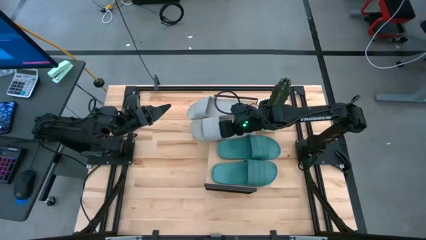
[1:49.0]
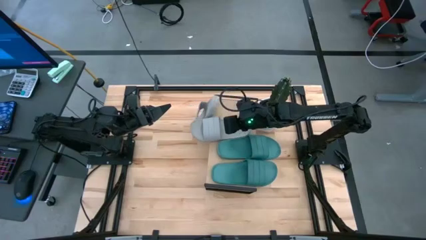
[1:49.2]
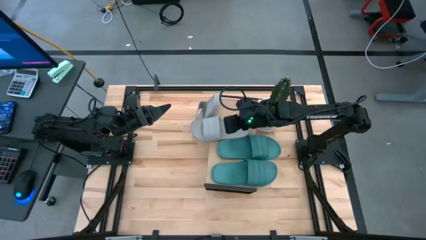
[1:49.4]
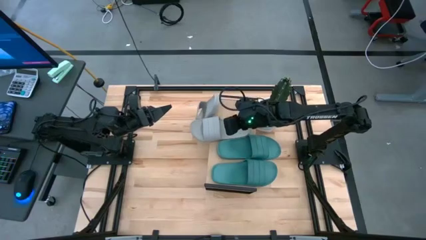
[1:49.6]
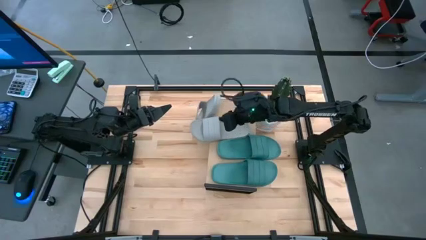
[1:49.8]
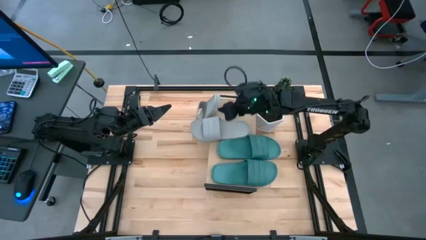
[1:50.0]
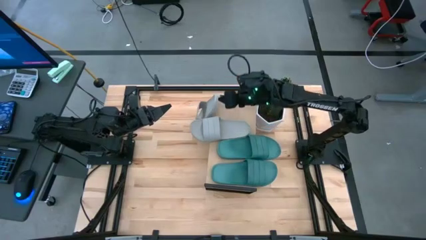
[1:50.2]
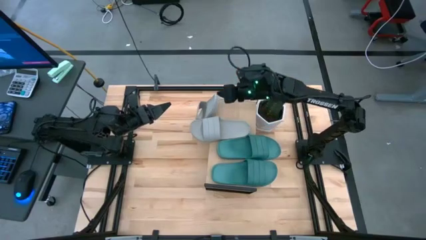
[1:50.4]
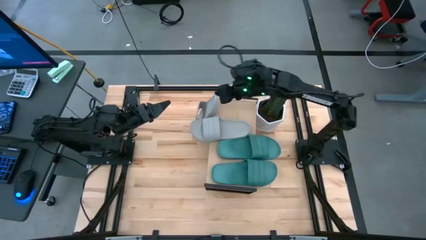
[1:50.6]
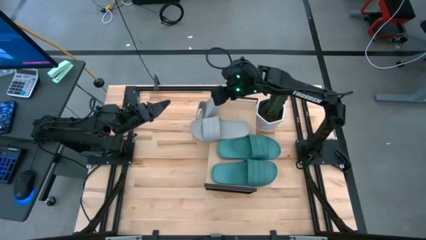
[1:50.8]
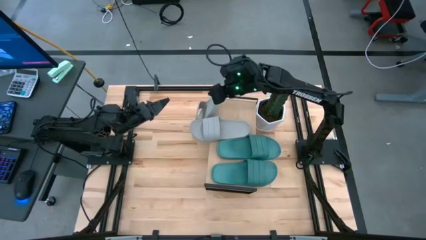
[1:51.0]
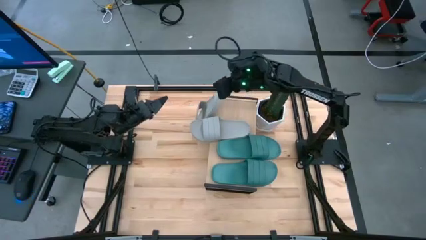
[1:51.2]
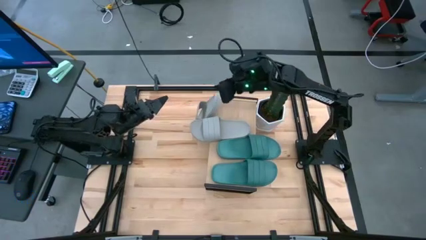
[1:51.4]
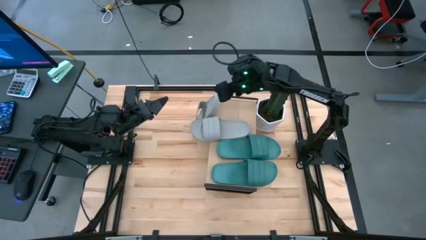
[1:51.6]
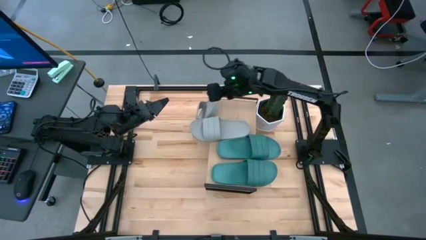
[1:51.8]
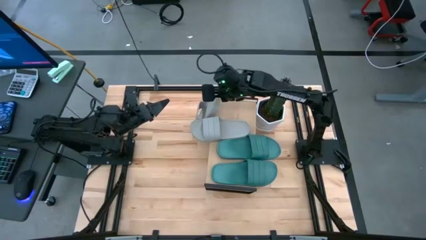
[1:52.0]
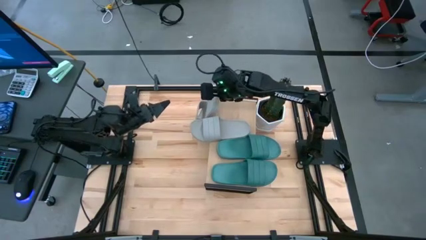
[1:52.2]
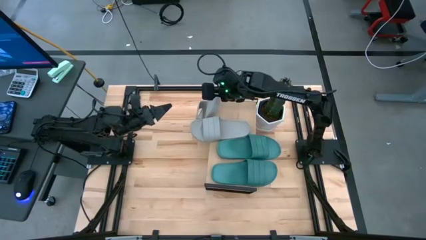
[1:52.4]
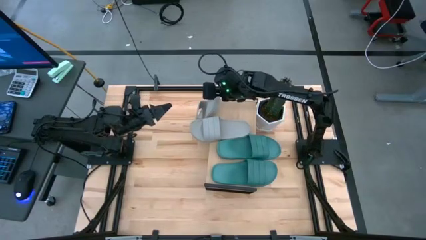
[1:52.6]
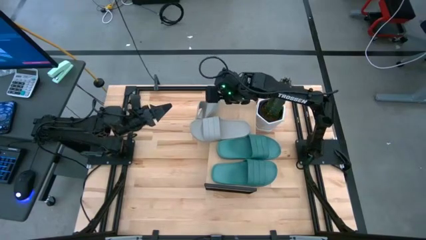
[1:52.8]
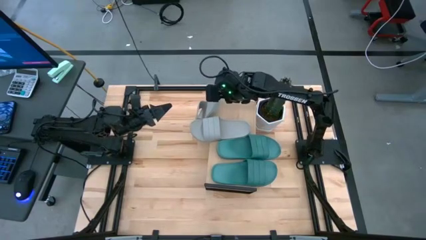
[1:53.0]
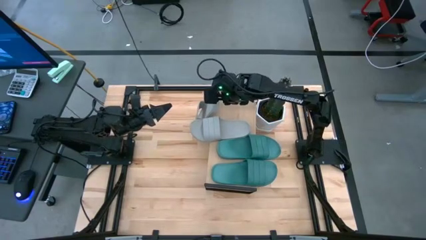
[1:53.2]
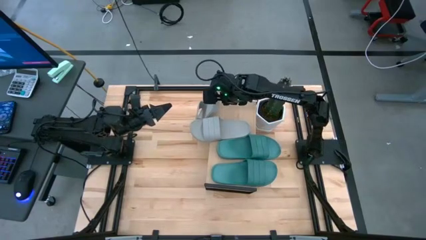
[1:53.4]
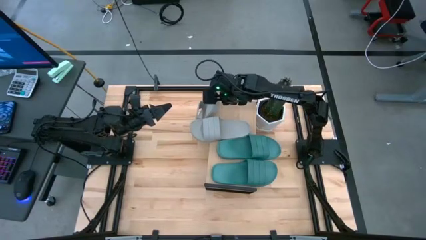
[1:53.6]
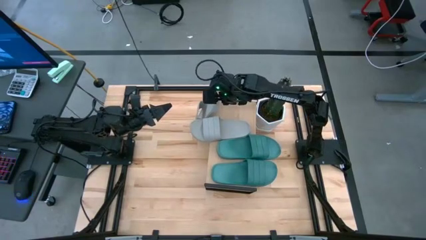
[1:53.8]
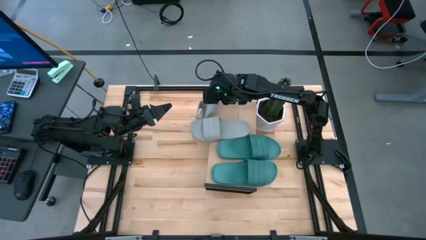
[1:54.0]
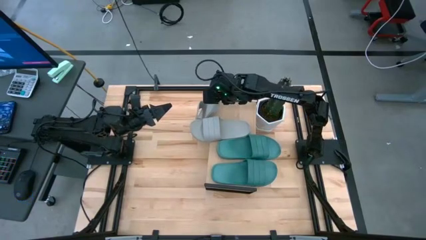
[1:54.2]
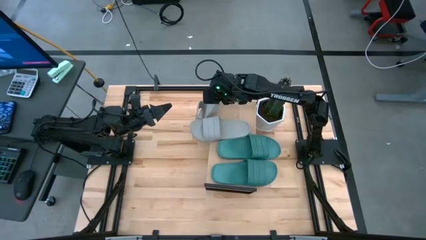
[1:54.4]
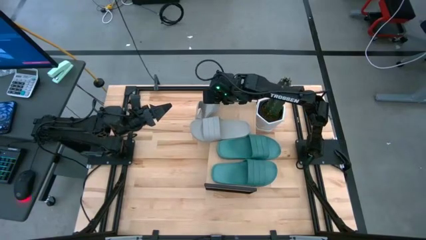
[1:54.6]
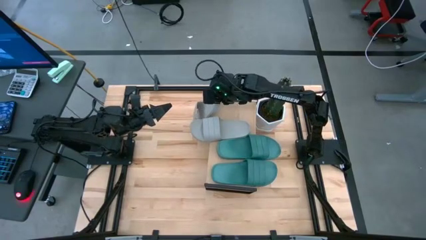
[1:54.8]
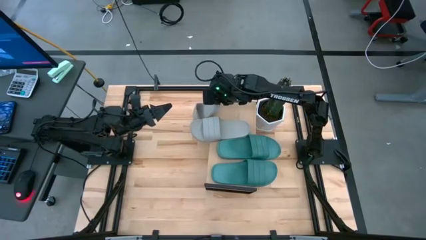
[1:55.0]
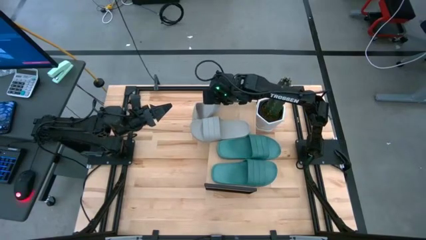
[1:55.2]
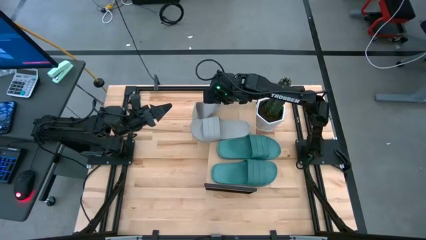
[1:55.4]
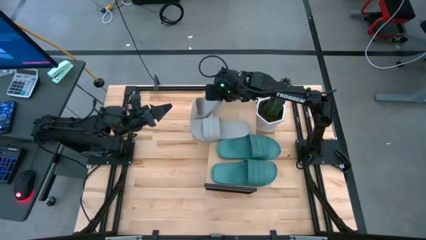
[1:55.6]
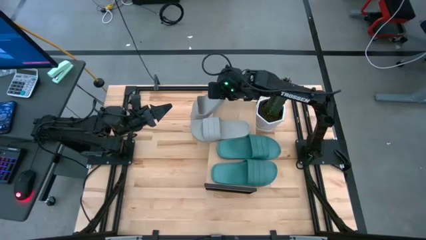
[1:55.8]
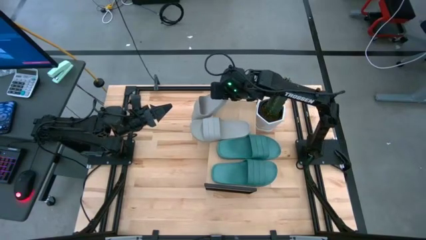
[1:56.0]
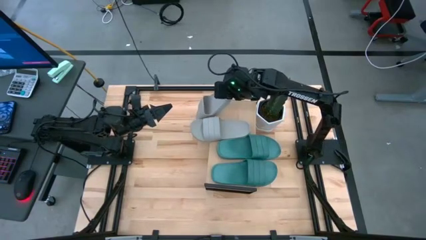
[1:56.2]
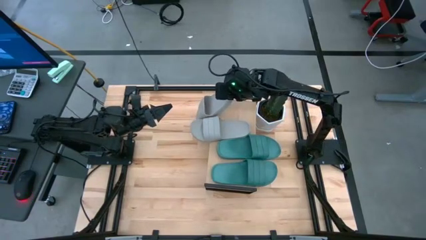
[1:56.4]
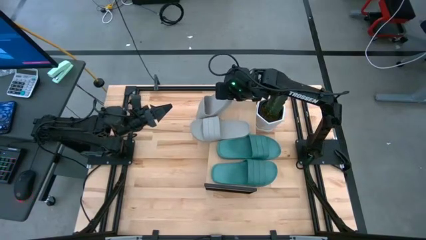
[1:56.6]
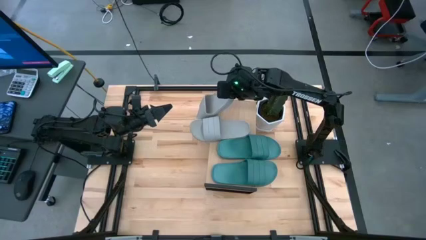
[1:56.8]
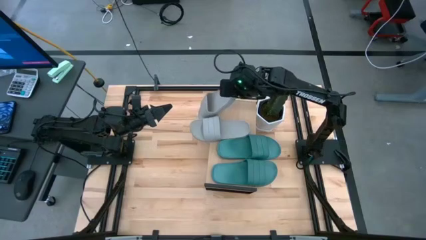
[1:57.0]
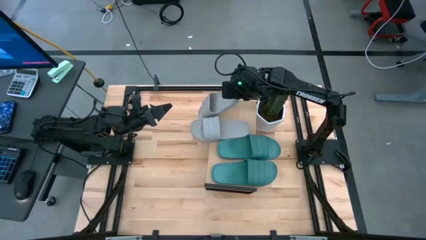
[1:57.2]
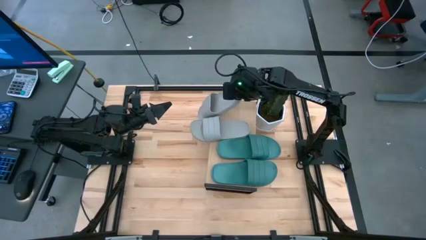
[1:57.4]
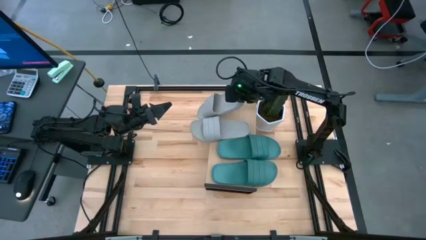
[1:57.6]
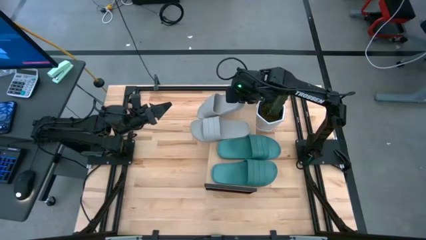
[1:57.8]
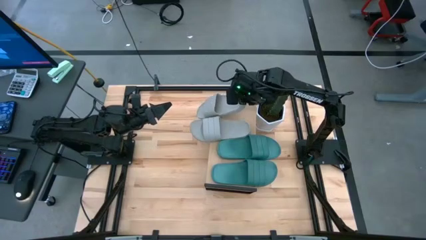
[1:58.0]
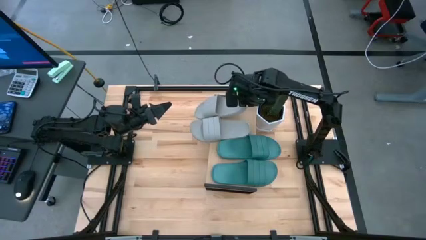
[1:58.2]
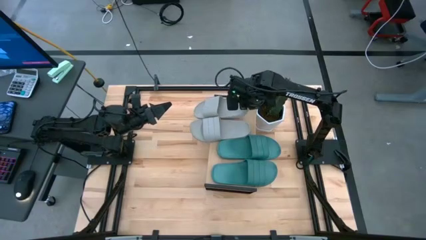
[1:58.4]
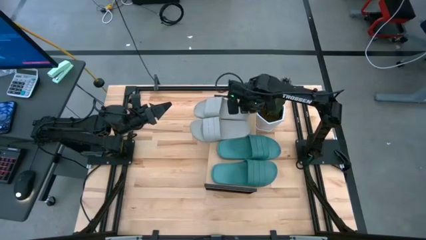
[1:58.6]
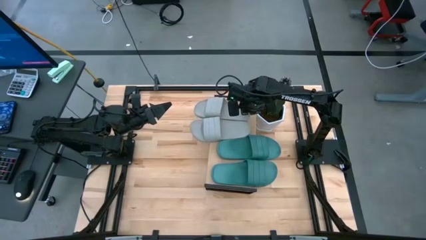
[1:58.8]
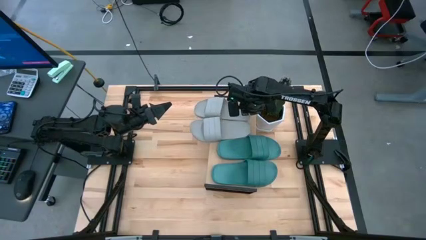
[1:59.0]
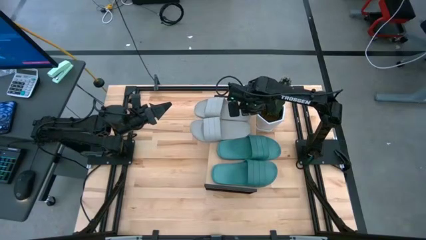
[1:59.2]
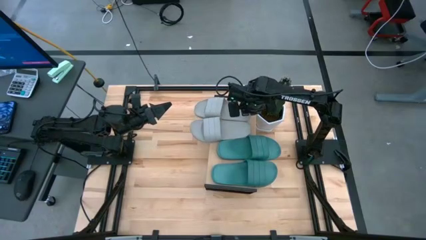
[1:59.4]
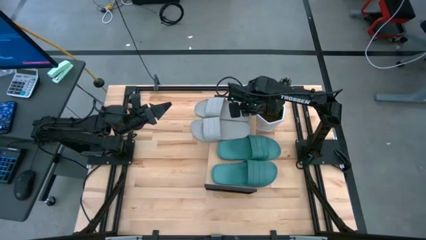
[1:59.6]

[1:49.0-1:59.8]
Task: Pick and place slides into the shelf
Adjust the gray slides on the shelf

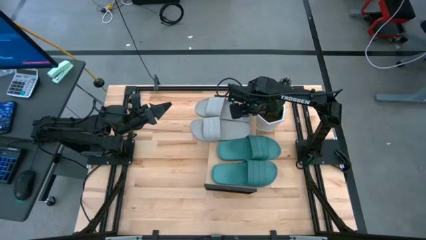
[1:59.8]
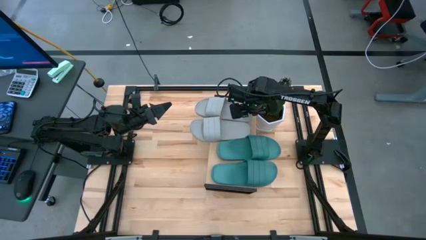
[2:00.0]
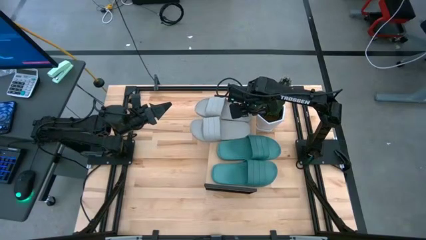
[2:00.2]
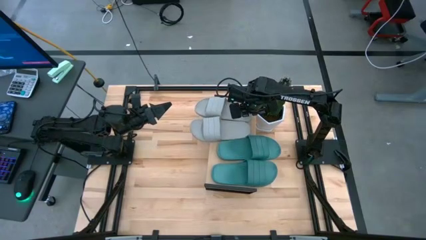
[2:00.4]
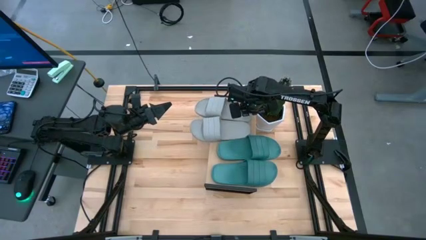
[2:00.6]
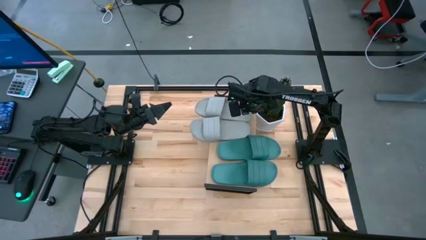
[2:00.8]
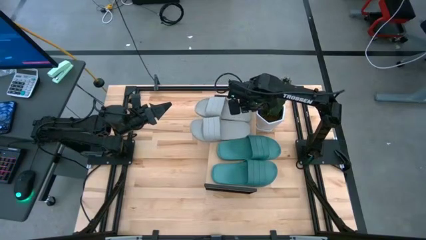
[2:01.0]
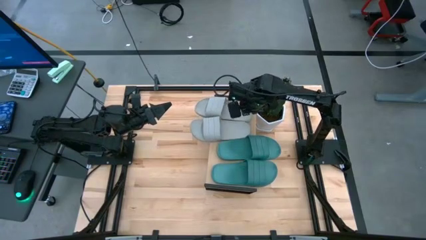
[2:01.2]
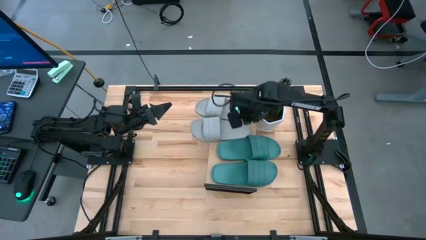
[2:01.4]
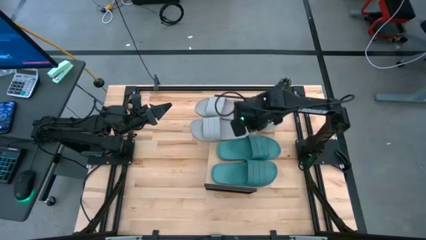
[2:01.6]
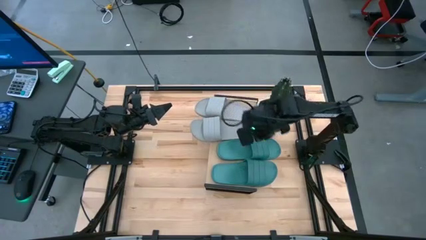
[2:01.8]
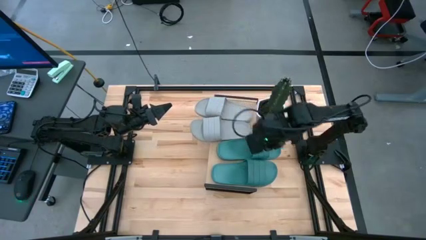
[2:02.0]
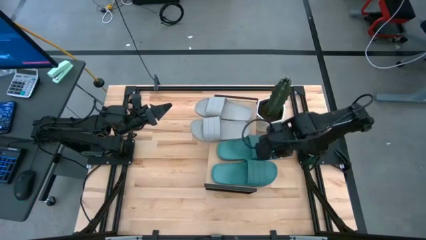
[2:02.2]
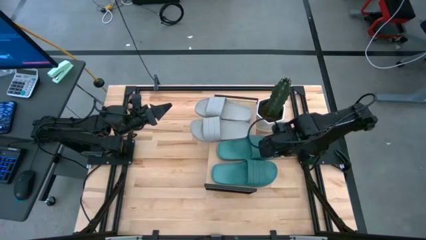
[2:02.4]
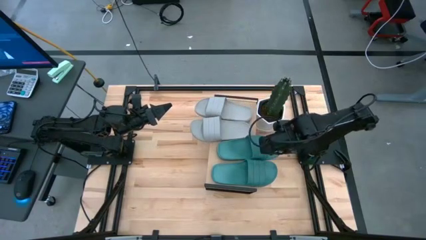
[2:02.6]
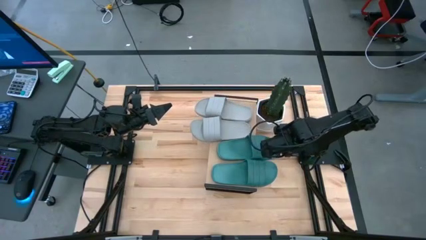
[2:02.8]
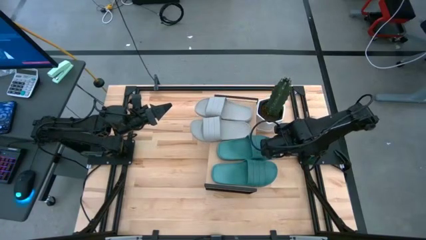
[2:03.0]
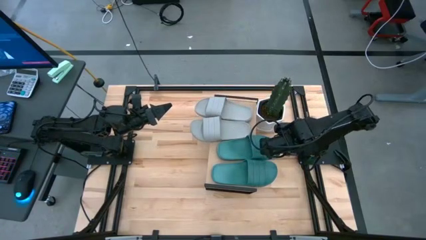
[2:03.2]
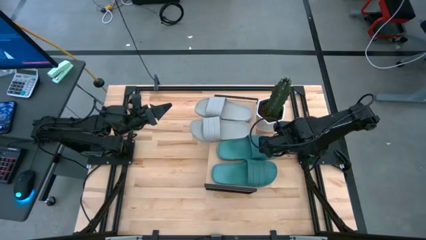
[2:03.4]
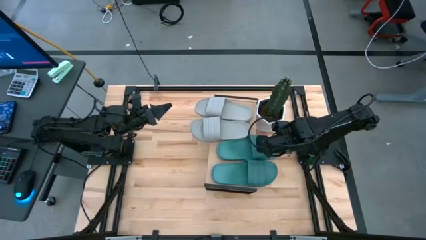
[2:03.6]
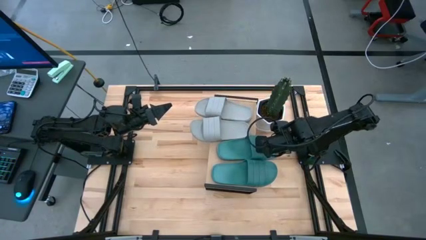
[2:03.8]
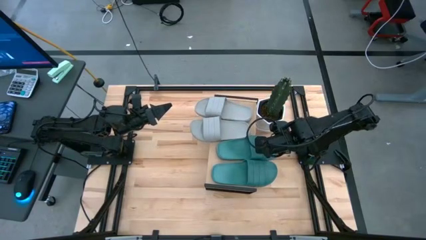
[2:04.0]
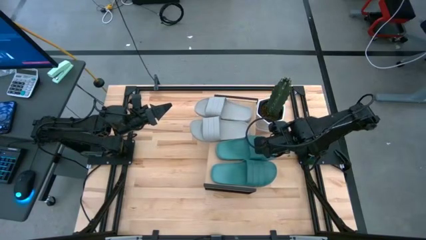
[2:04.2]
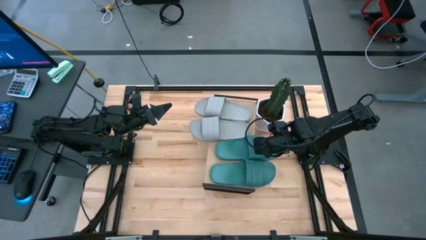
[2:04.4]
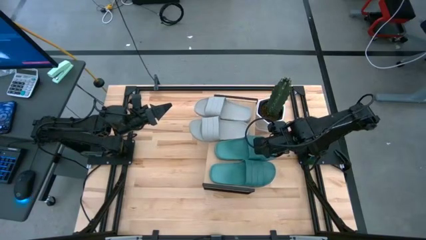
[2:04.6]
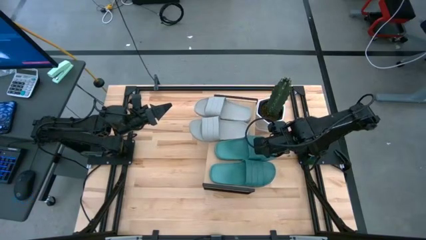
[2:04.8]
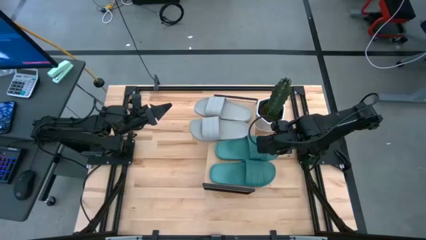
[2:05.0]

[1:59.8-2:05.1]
Adjust the green slide on the shelf
